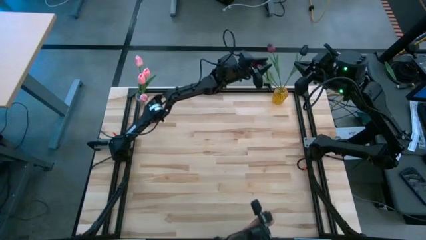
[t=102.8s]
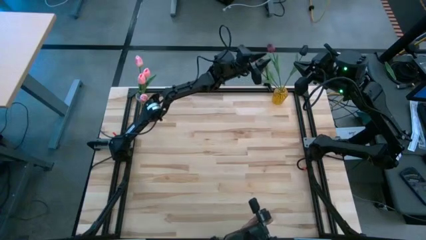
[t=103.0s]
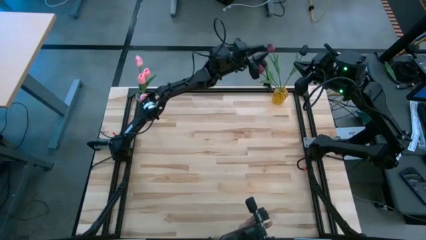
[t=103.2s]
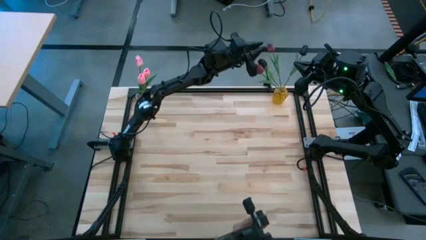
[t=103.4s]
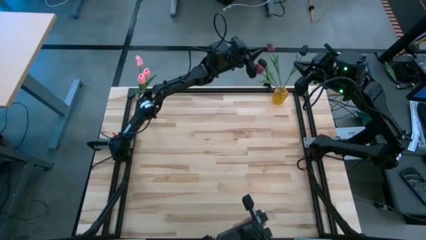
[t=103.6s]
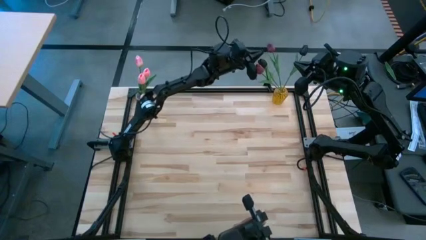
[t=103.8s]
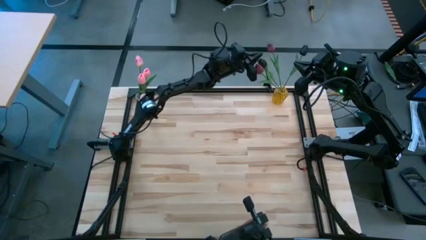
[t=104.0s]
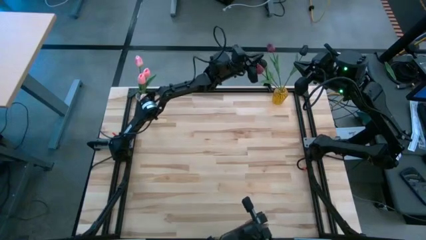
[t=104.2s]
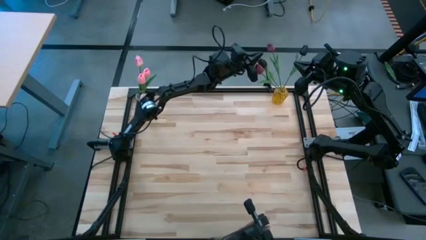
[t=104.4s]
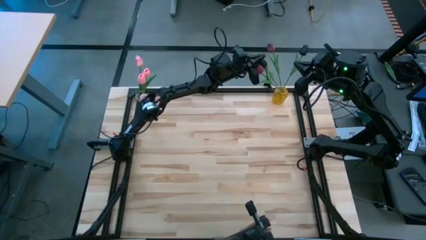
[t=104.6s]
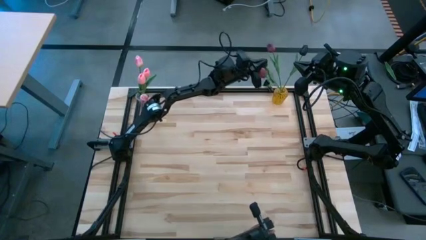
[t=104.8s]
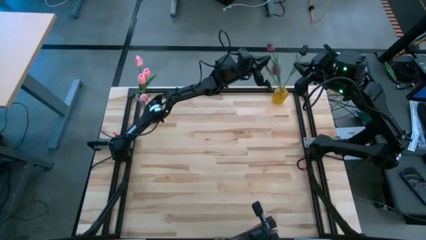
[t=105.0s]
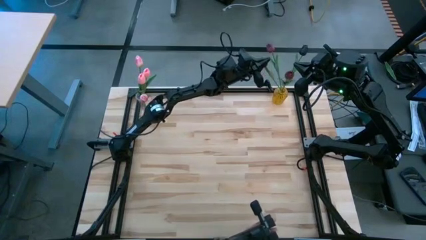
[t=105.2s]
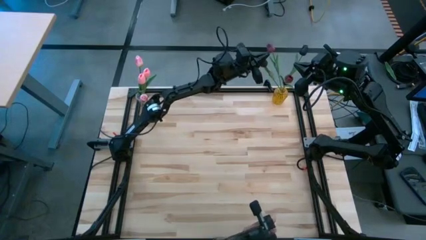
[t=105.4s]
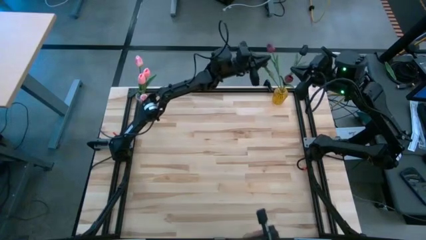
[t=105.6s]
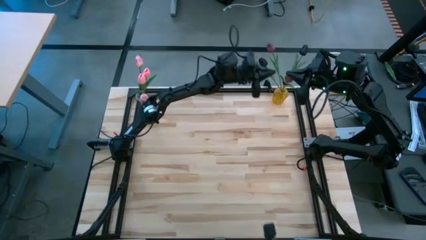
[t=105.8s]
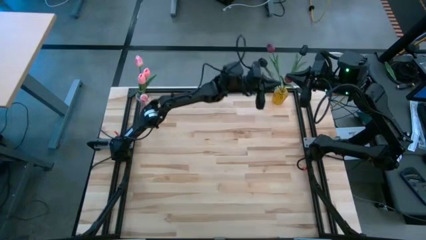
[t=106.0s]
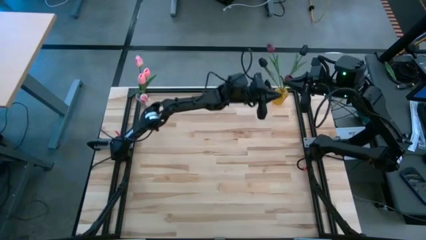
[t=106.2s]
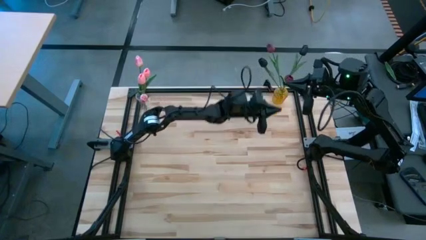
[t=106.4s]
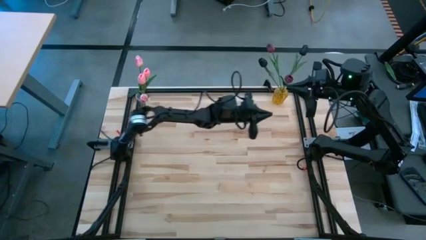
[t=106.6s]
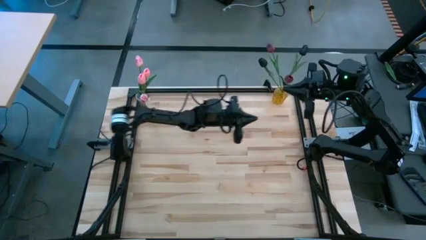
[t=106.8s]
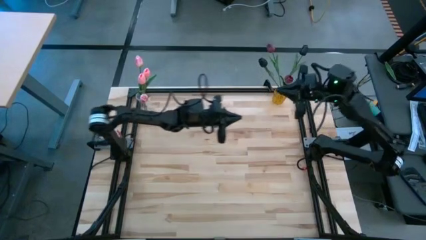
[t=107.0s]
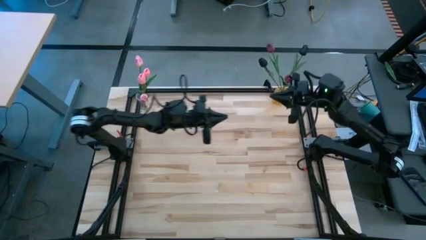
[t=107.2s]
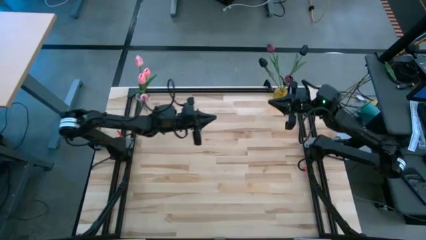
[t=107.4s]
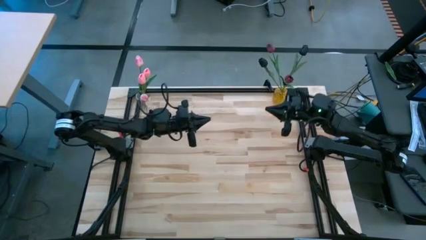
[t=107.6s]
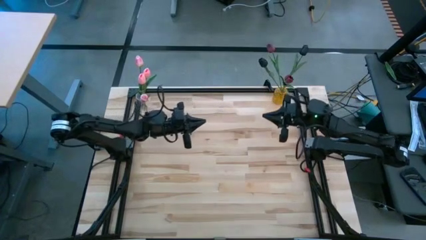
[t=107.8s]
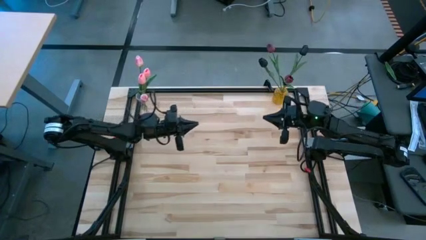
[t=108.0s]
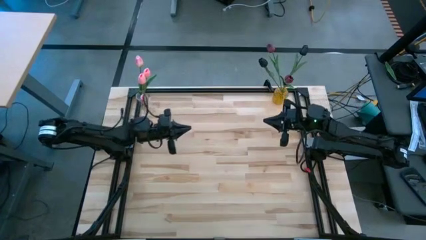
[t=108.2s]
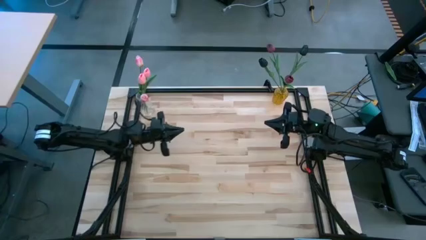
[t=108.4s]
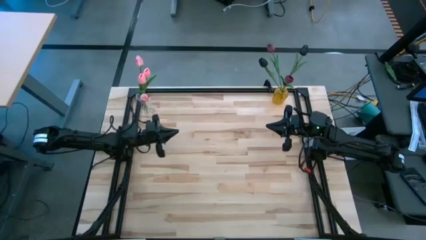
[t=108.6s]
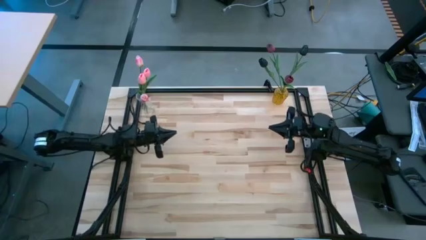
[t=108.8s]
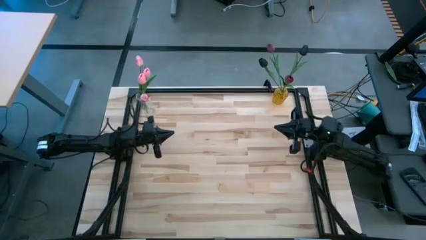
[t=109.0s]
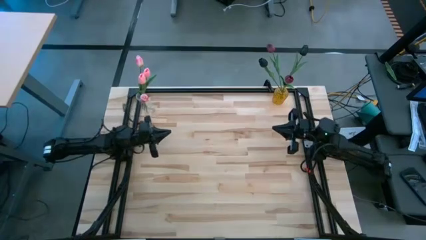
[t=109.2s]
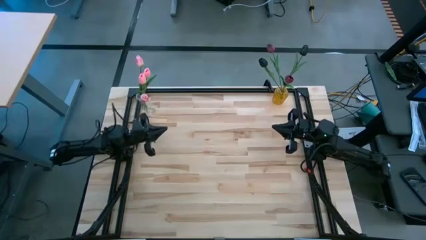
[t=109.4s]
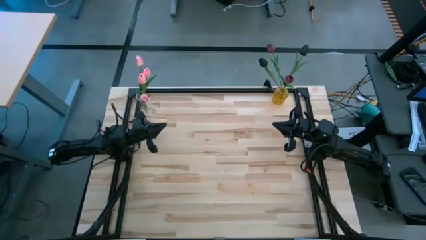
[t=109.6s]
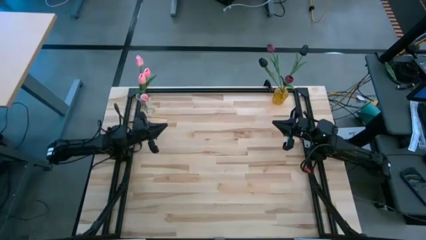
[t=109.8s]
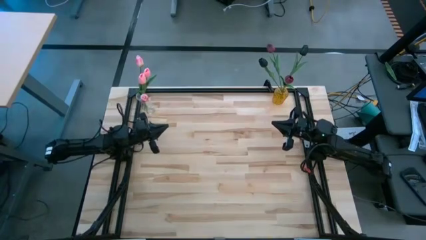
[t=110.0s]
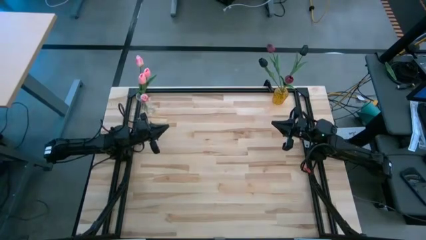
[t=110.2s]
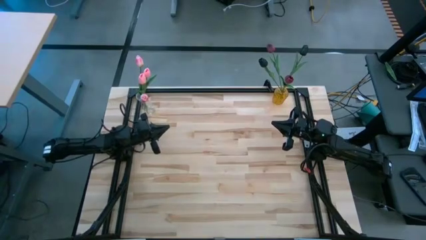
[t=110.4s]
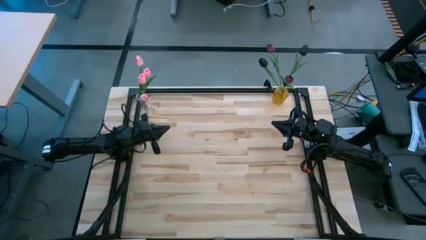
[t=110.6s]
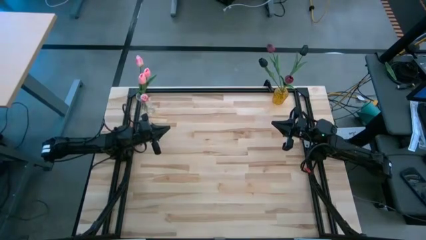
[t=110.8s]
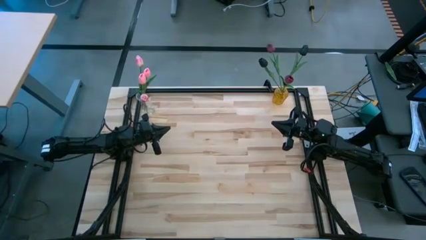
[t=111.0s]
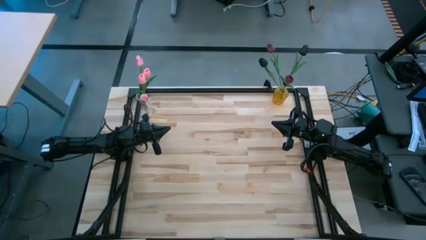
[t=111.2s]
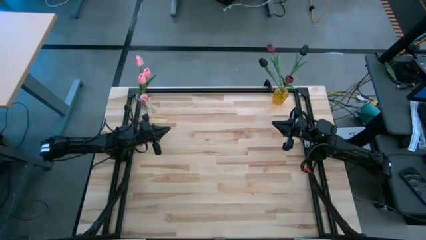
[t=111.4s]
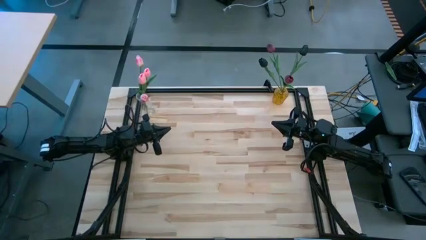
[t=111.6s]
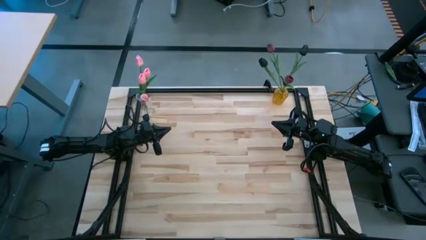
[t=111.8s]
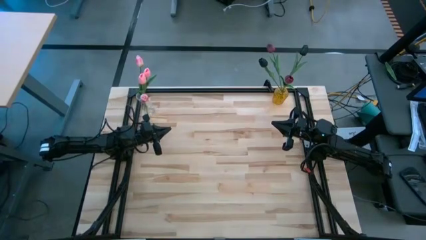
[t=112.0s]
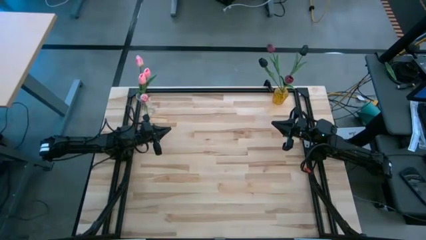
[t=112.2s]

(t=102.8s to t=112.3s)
Task: Sort flowers into vase by color
Return to Home Position

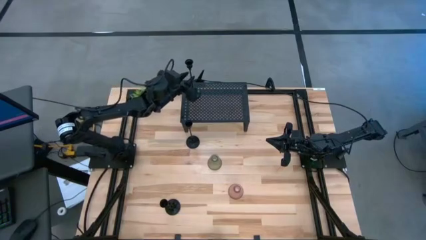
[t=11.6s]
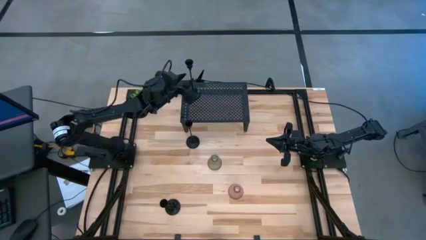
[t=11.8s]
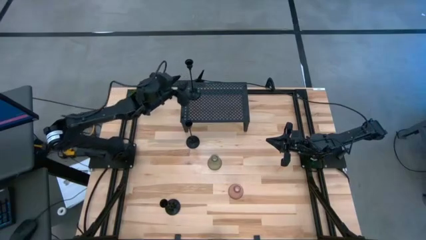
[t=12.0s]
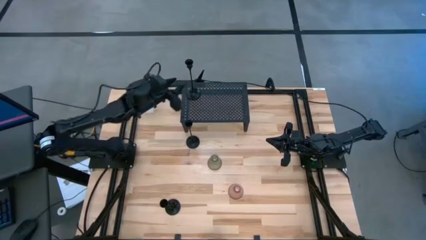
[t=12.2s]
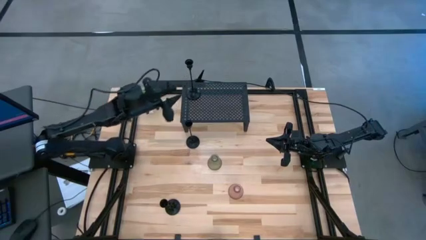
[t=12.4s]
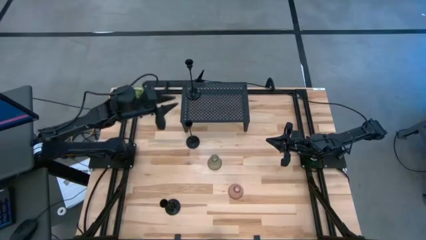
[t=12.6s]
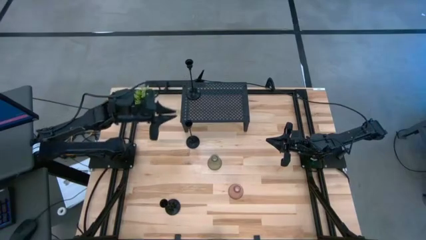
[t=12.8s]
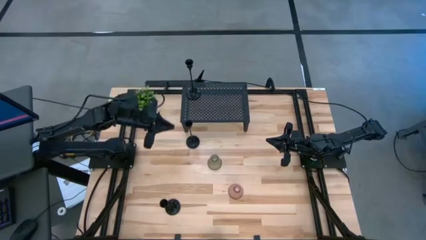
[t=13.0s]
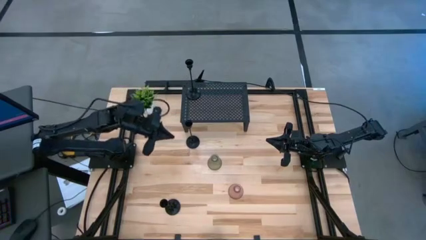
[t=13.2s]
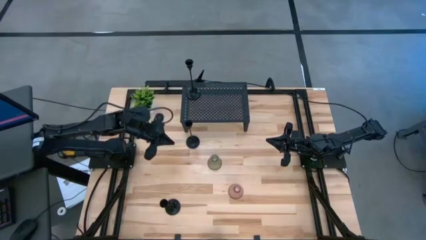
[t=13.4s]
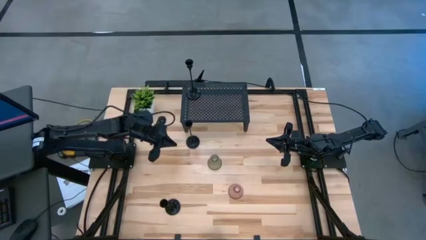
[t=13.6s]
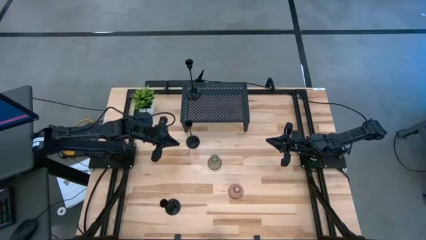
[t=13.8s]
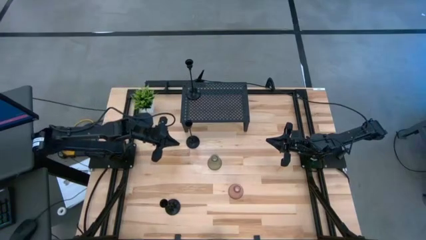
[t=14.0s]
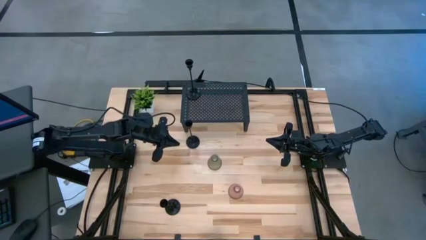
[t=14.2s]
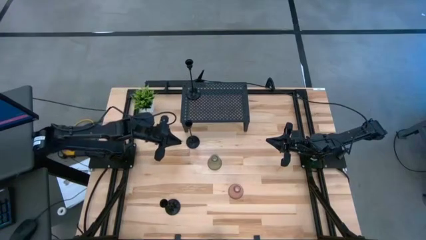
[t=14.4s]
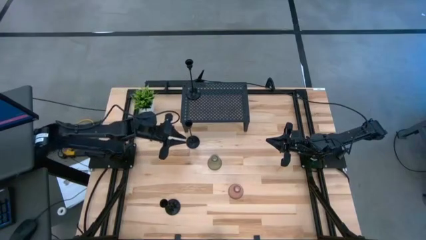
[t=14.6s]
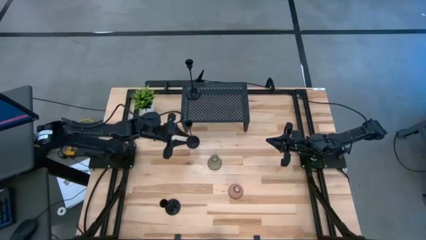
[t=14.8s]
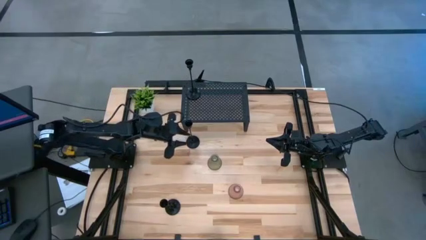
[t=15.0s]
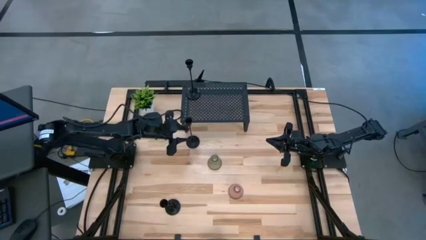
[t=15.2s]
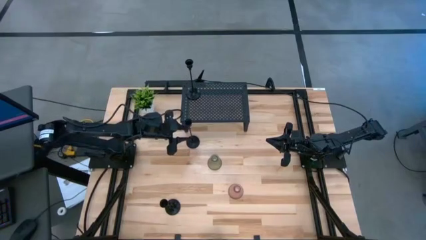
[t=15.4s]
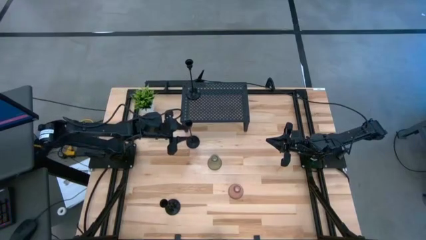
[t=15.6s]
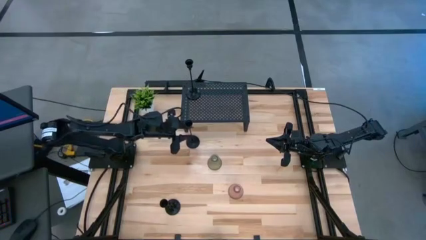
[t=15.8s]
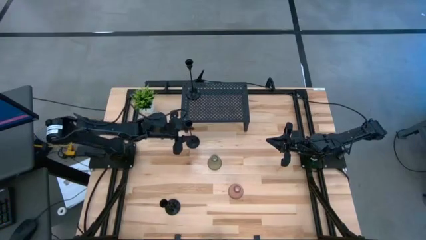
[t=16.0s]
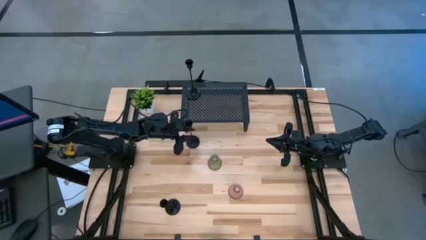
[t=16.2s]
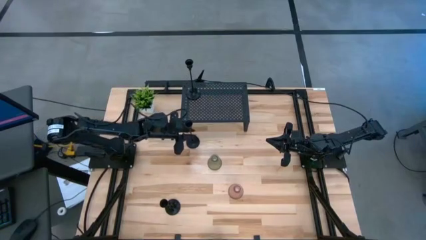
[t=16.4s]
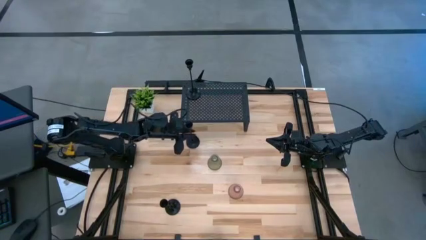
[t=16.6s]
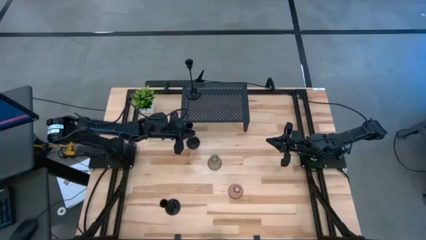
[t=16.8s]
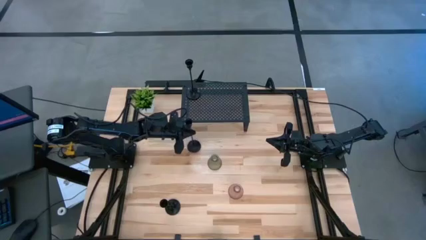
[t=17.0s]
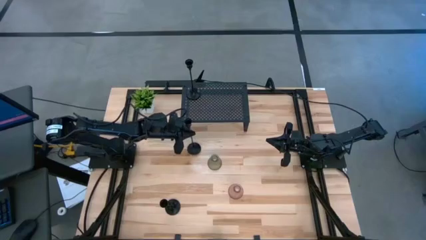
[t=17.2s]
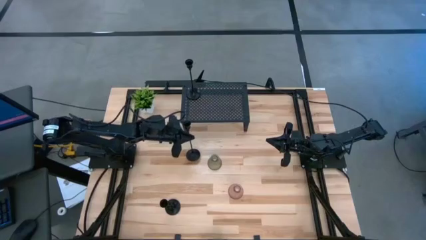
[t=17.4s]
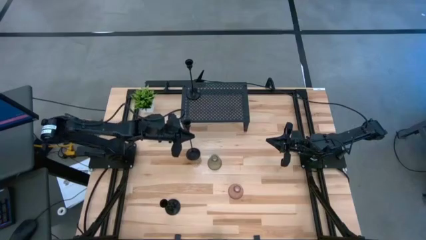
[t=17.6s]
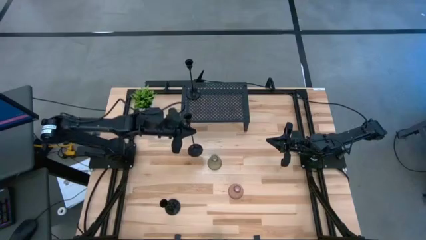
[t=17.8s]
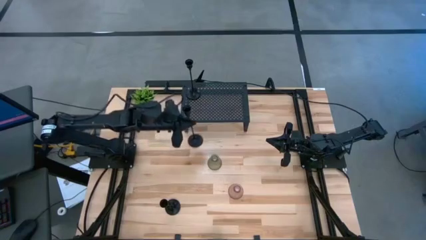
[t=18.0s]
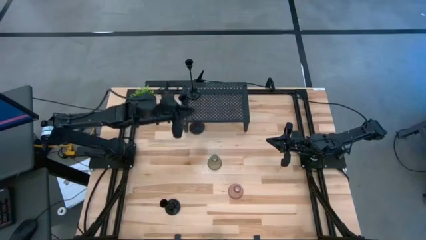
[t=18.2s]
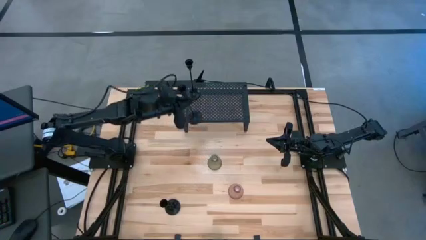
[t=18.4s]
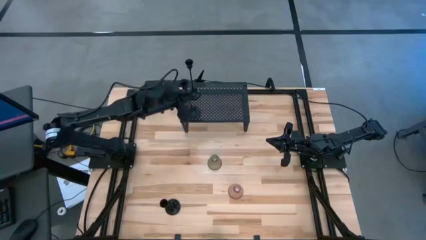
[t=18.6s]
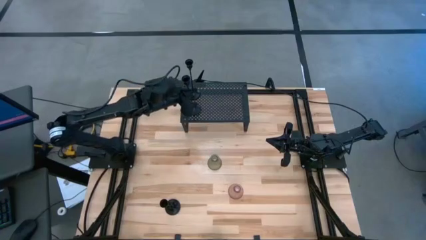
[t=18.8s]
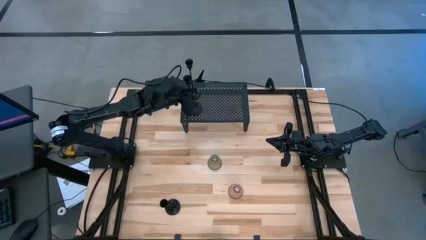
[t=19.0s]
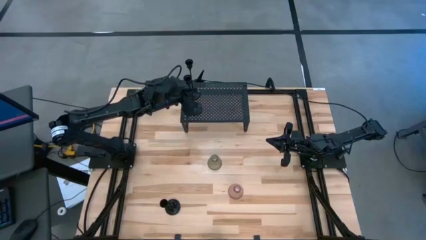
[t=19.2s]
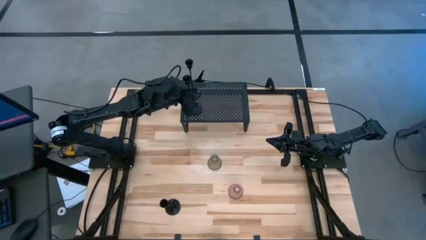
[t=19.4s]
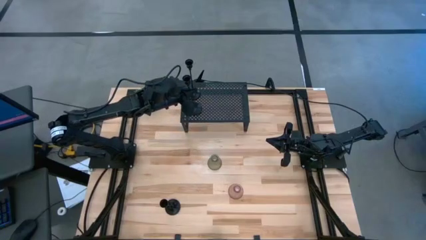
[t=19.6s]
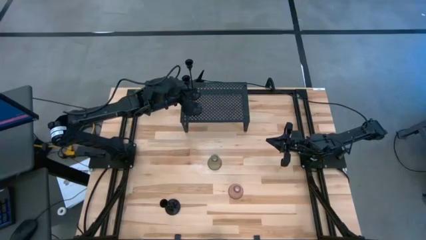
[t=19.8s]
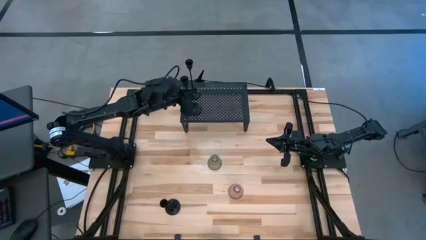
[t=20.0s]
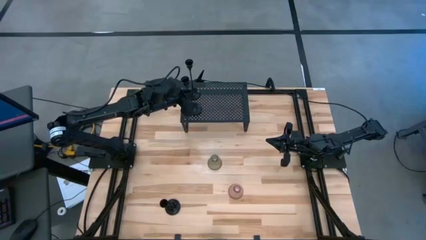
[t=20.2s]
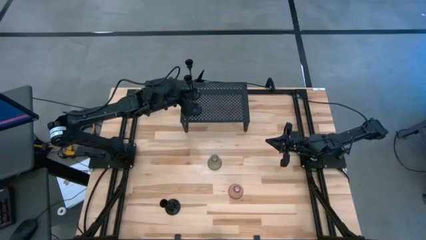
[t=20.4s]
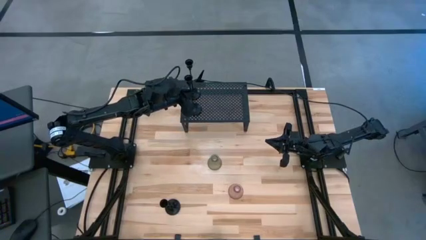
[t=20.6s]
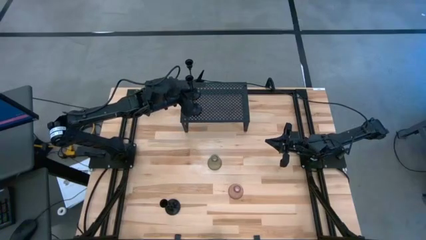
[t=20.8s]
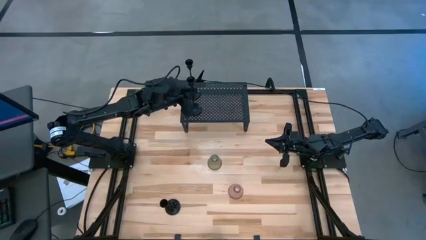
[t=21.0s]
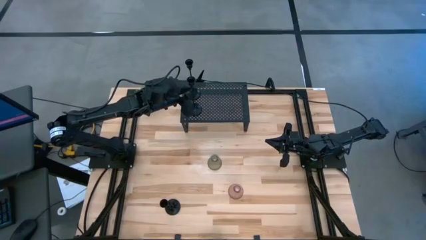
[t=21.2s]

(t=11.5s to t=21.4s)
Task: Pick & Place candle stick holders
Put the top black candle holder on the shelf
